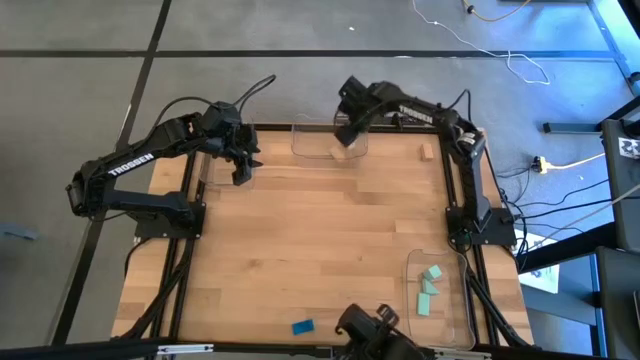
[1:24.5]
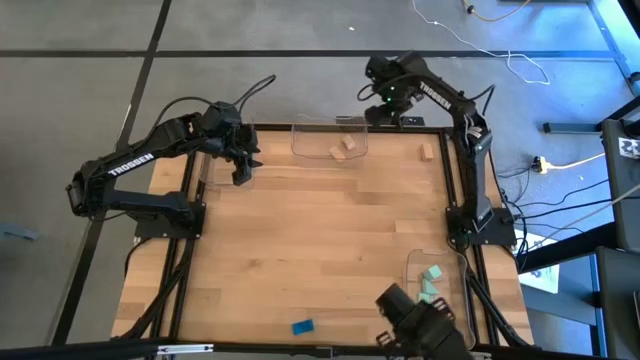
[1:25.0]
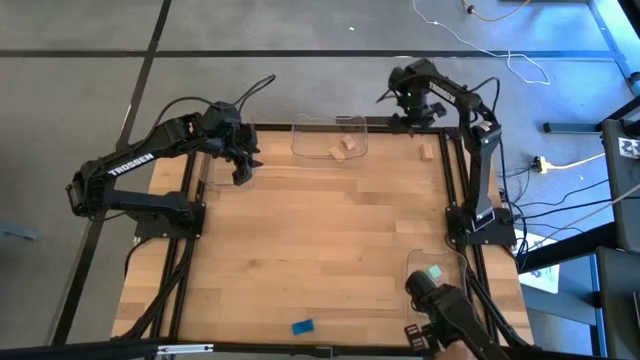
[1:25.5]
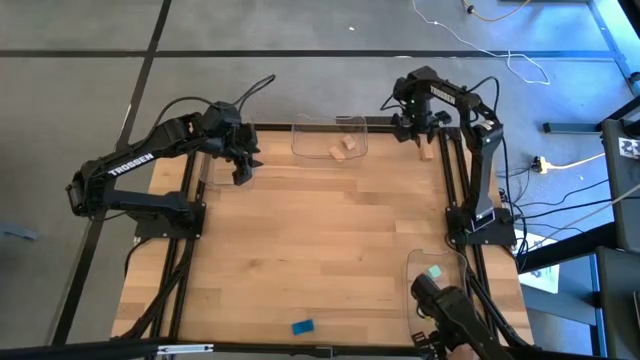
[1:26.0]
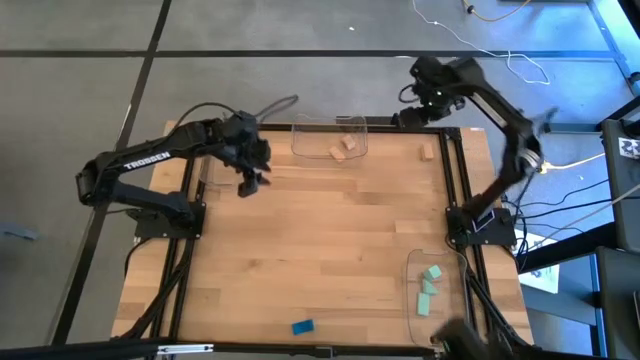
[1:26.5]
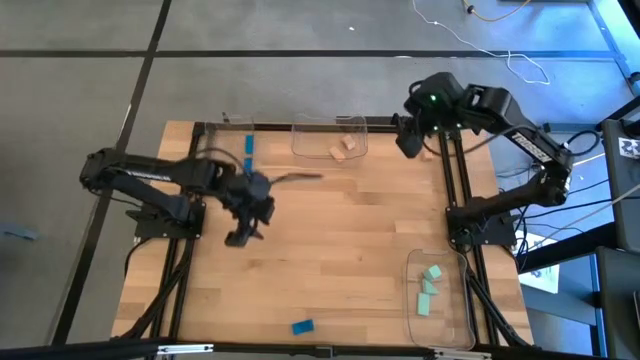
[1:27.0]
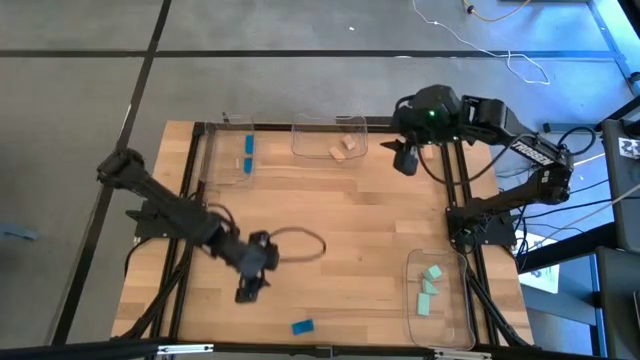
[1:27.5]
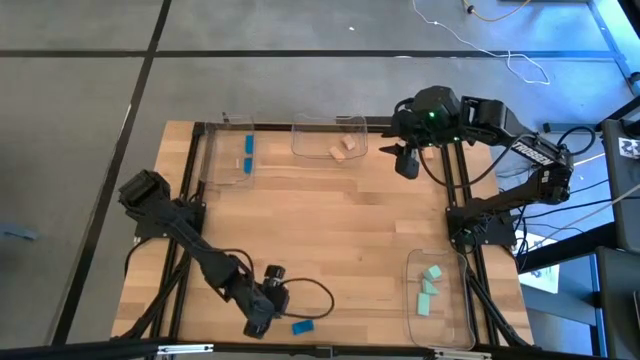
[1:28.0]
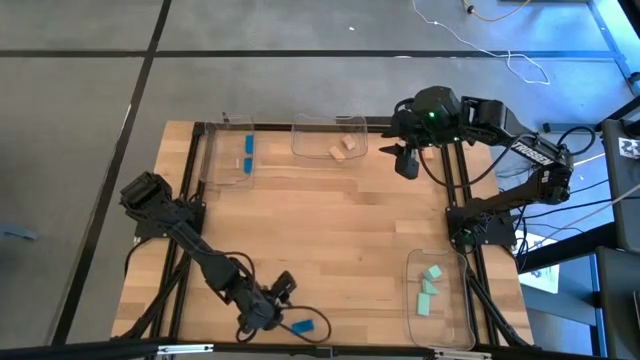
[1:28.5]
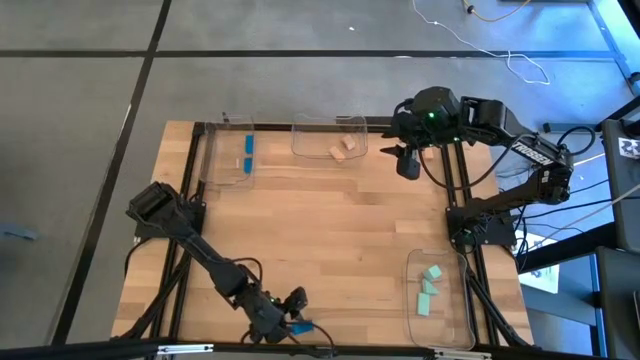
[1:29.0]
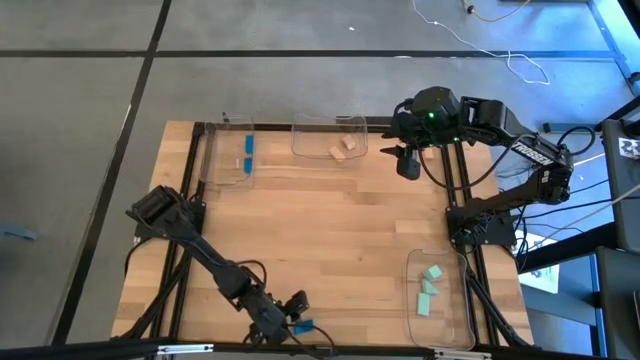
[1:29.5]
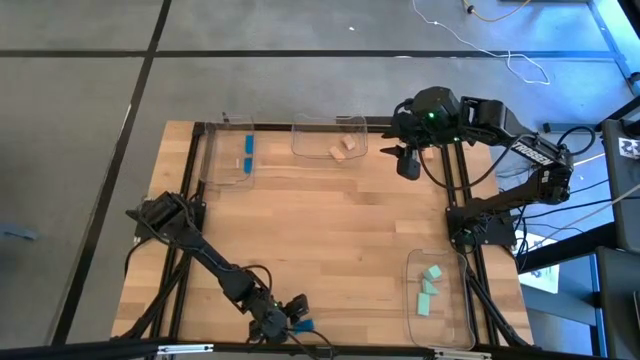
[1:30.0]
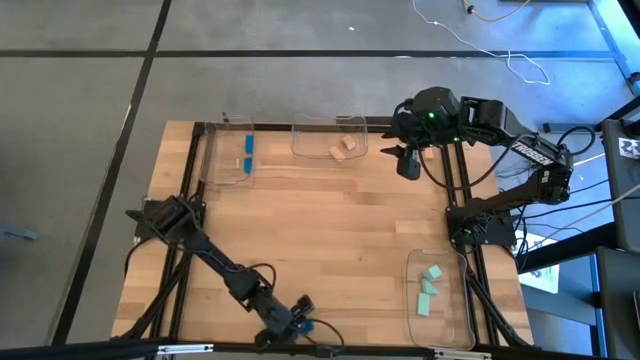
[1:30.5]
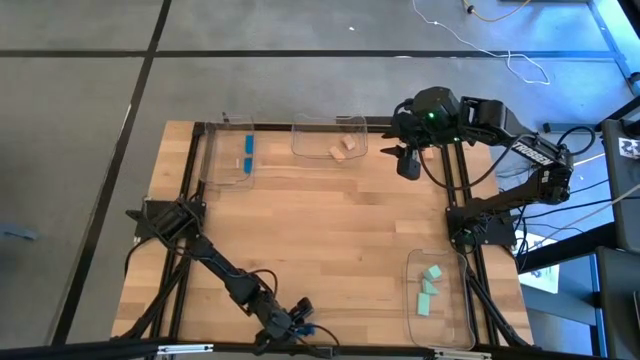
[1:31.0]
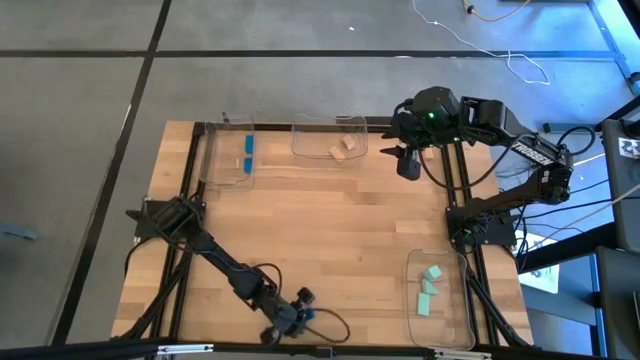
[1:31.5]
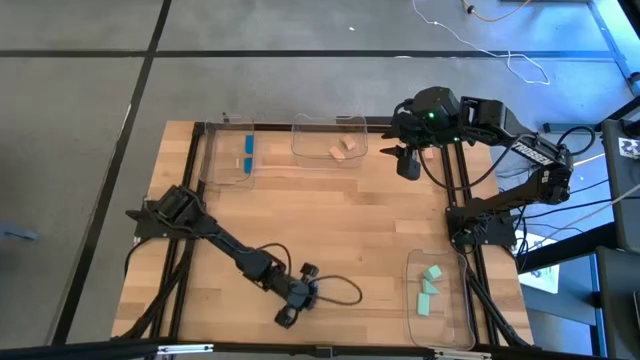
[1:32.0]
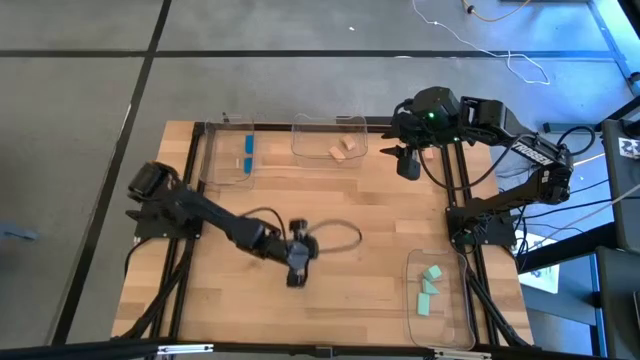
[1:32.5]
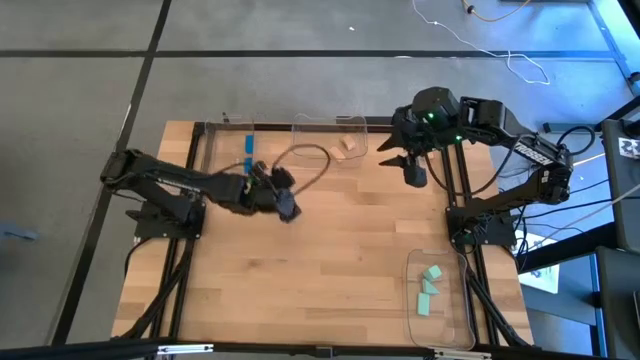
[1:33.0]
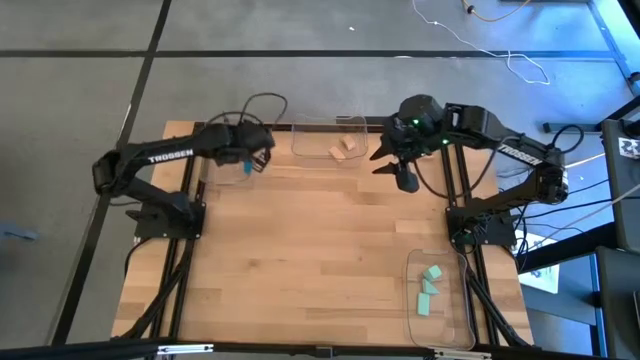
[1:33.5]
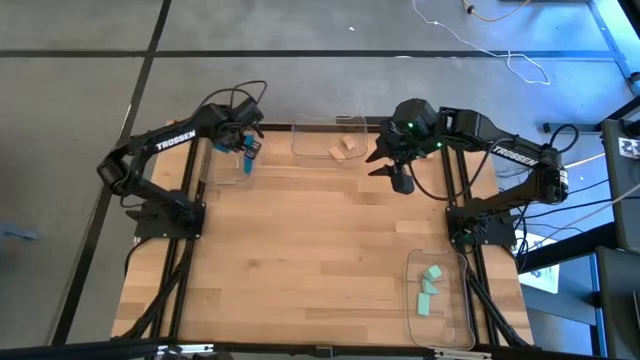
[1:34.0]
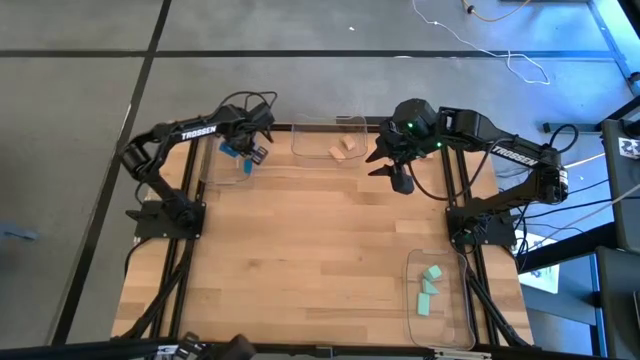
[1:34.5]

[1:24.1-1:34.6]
Task: Sort & place blocks by color
Put the blue block into the top left transparent bin

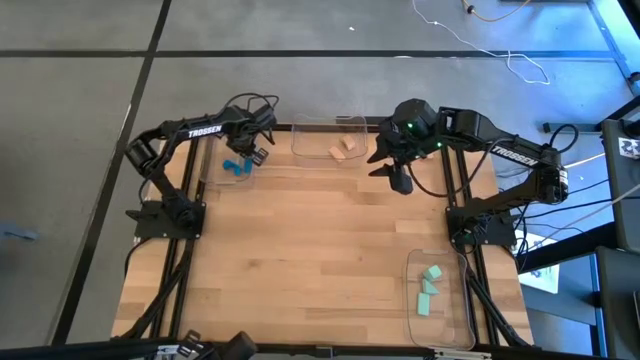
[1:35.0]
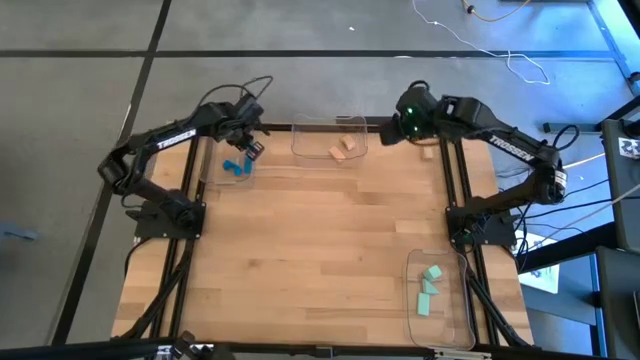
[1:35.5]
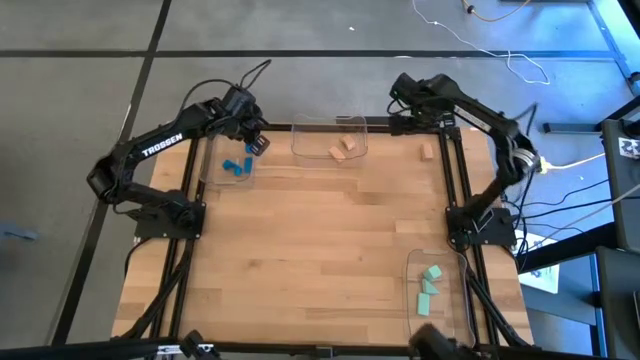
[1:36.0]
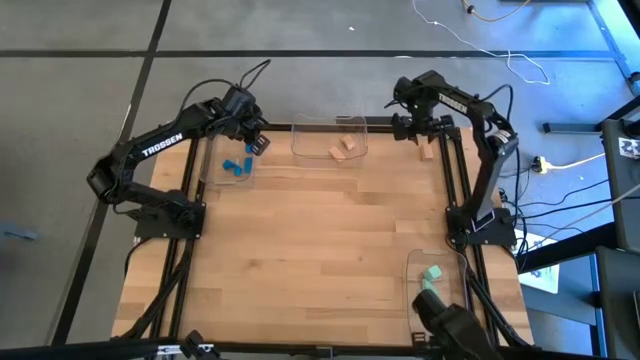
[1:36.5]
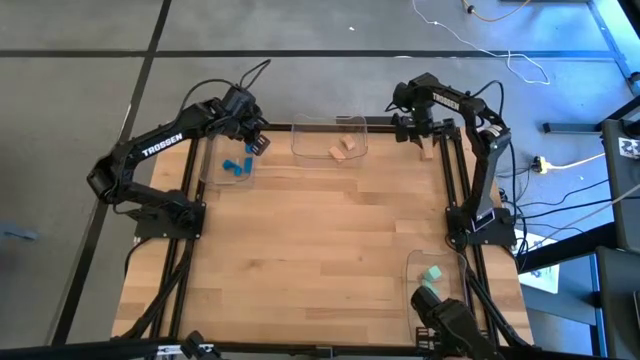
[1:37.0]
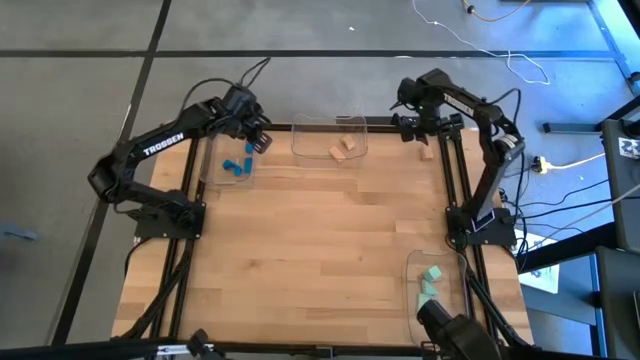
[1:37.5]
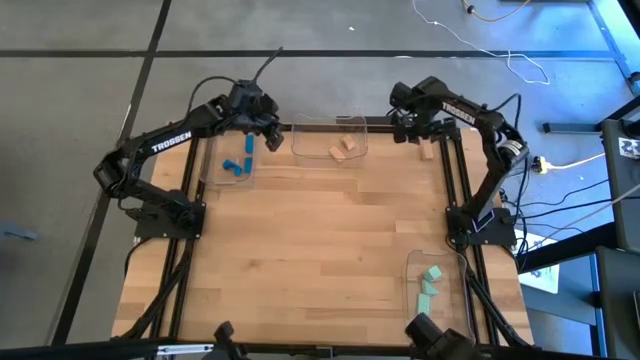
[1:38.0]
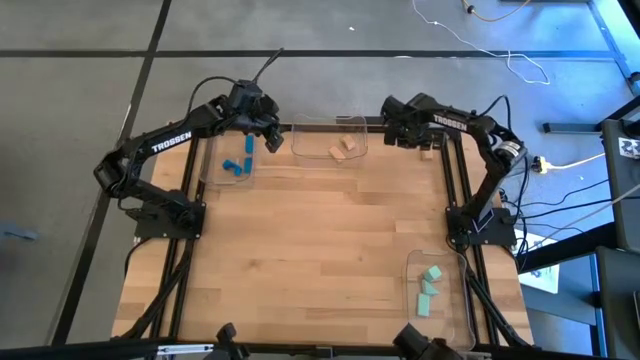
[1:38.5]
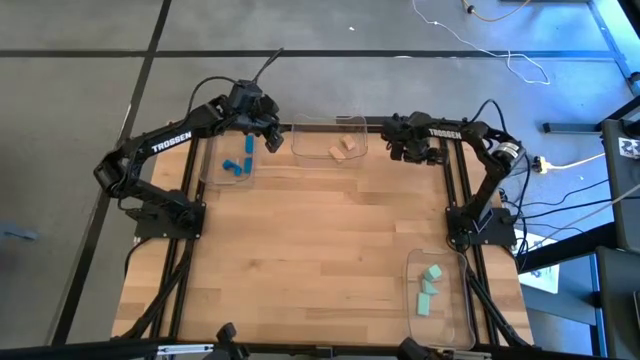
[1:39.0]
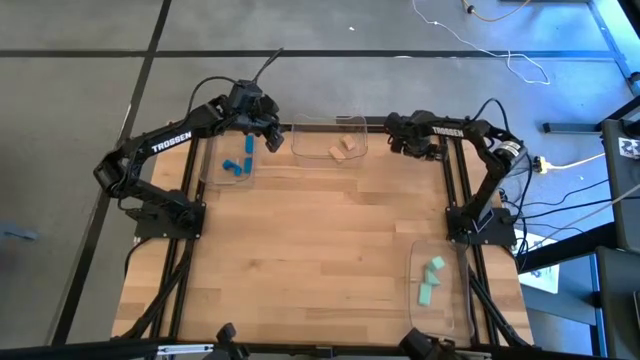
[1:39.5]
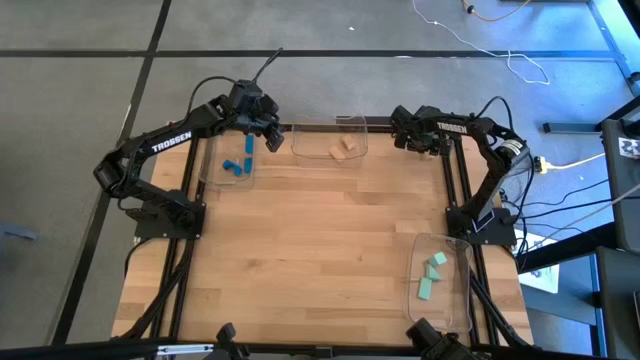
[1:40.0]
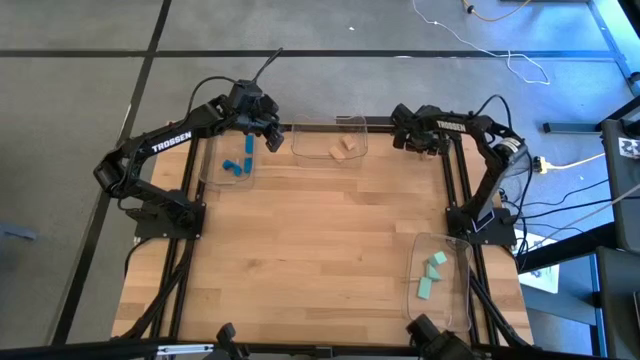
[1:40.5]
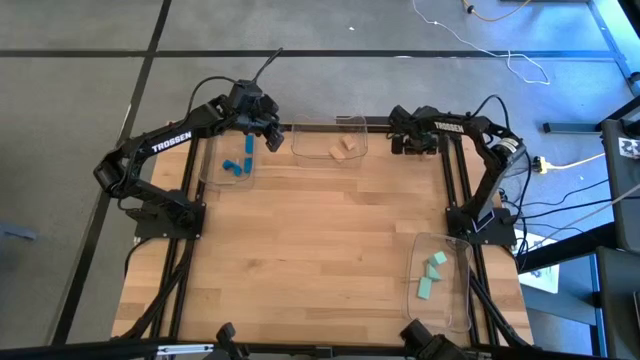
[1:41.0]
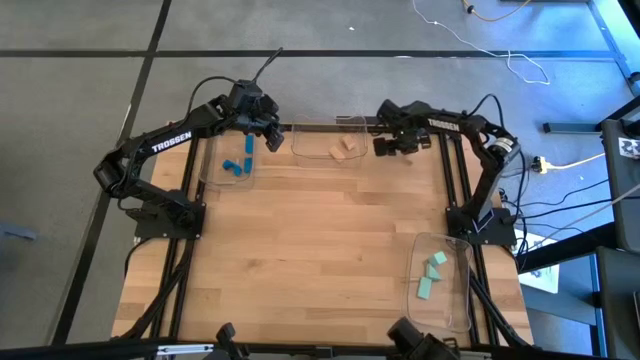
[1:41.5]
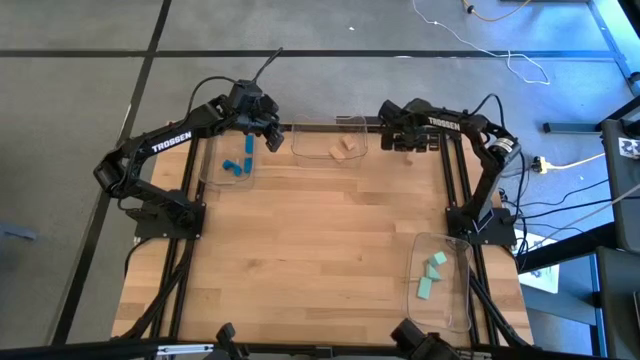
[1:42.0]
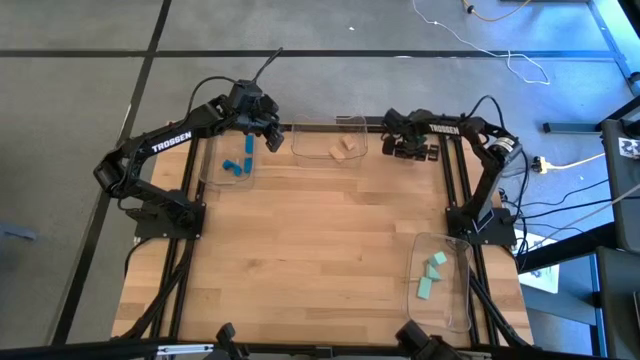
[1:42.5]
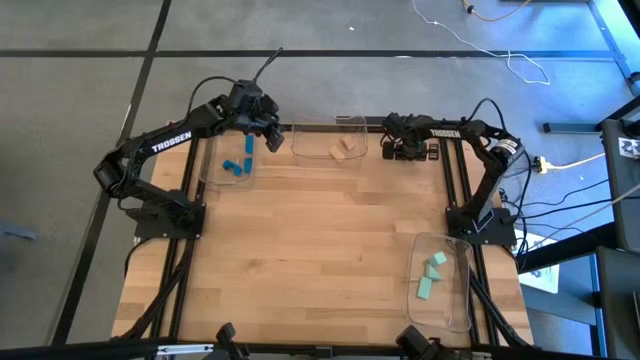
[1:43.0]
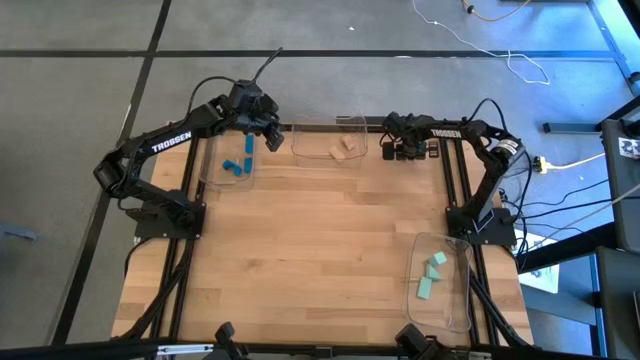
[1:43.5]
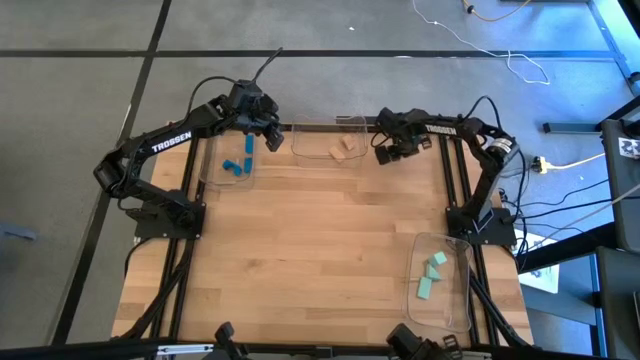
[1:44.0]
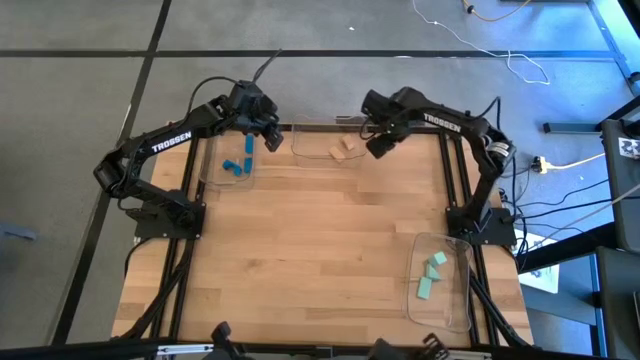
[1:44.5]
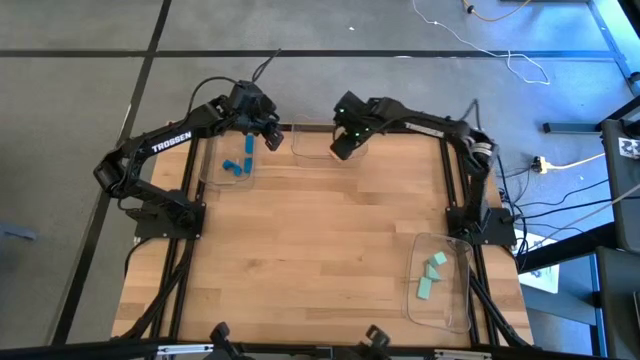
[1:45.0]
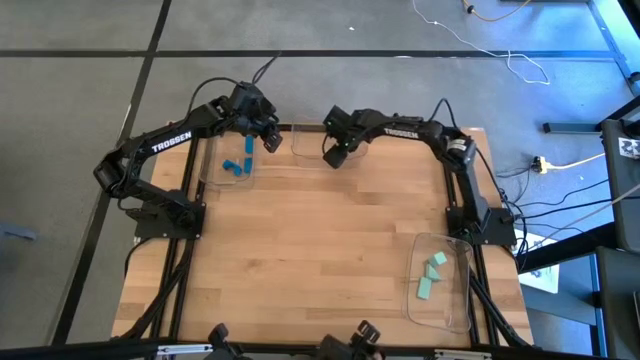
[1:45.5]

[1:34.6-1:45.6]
Put the brown block into the top middle transparent bin
